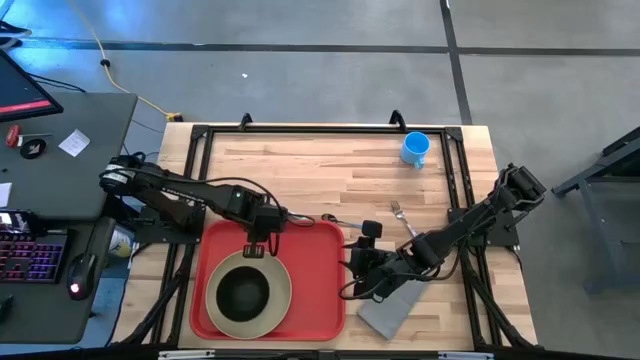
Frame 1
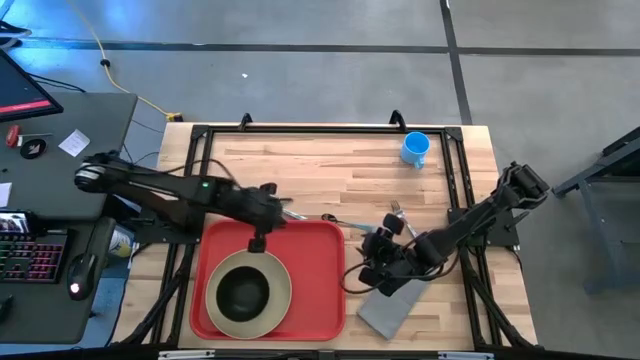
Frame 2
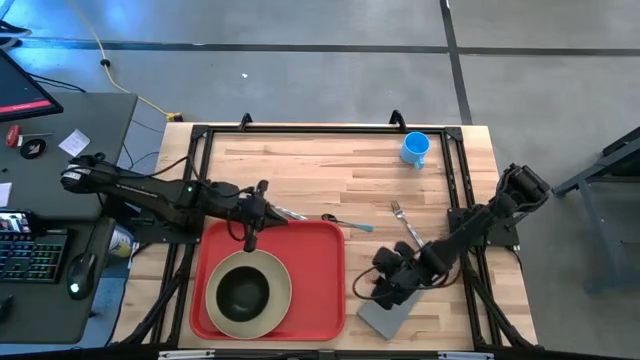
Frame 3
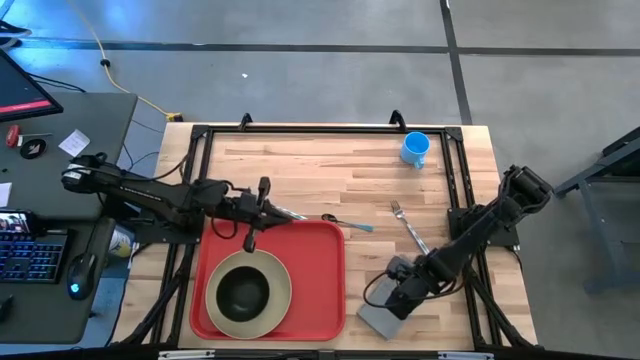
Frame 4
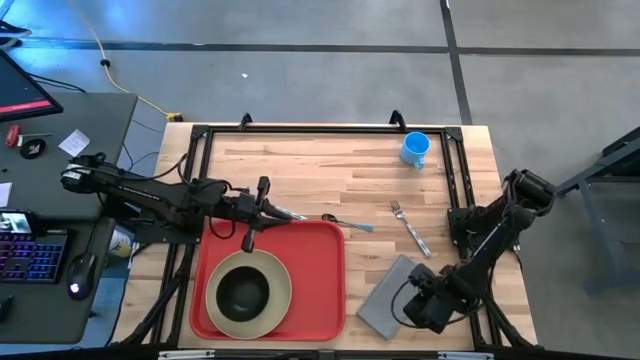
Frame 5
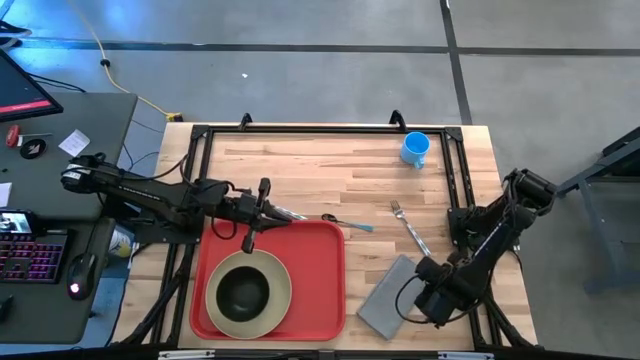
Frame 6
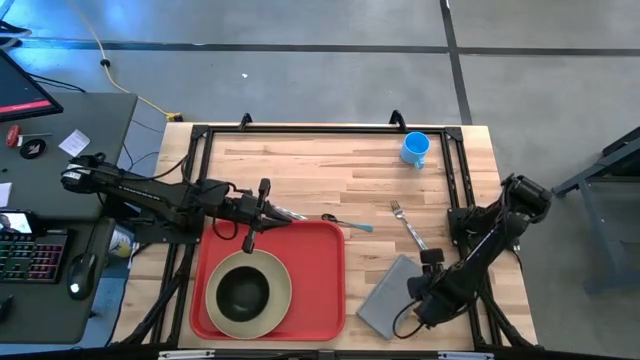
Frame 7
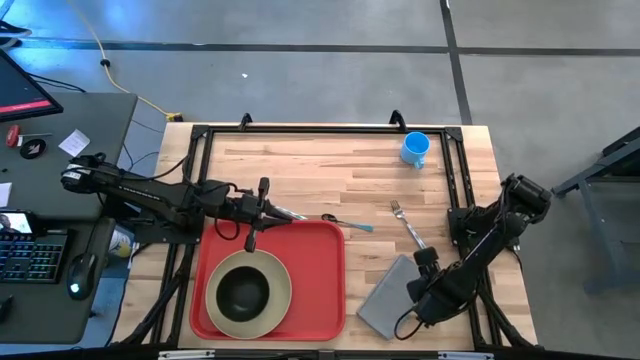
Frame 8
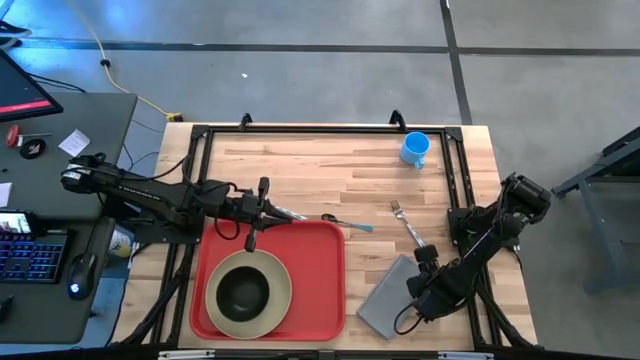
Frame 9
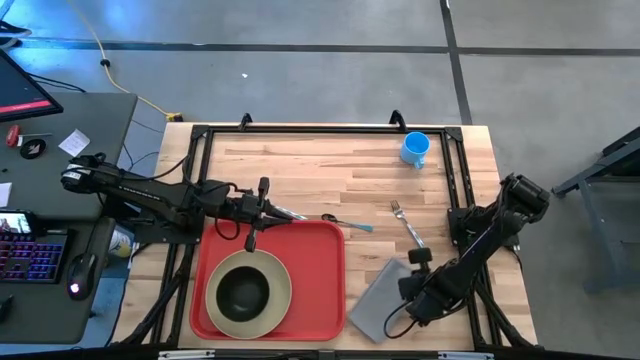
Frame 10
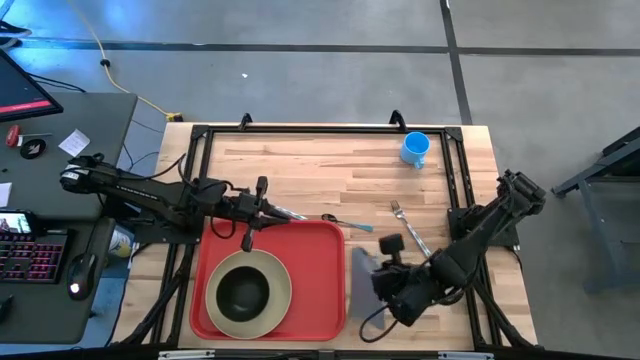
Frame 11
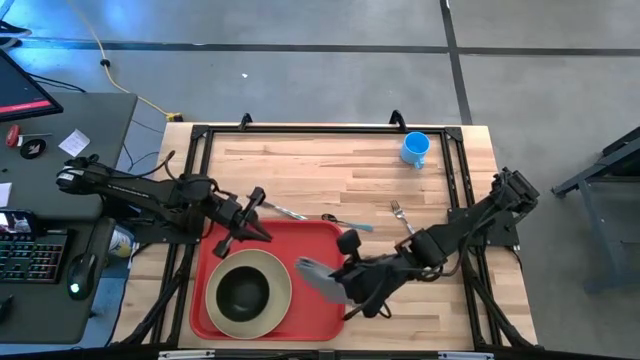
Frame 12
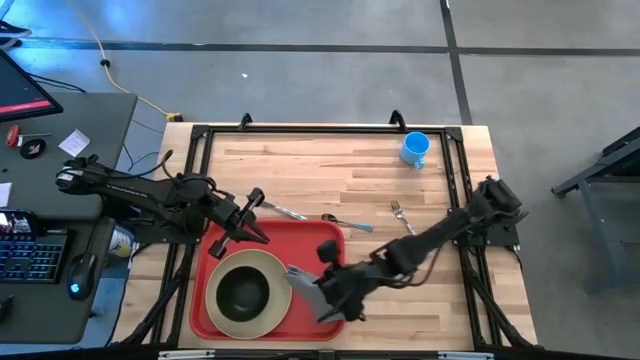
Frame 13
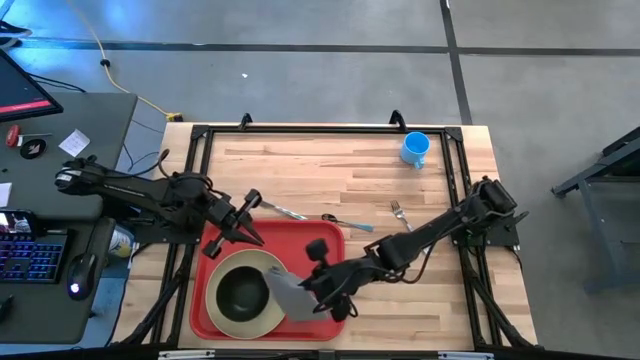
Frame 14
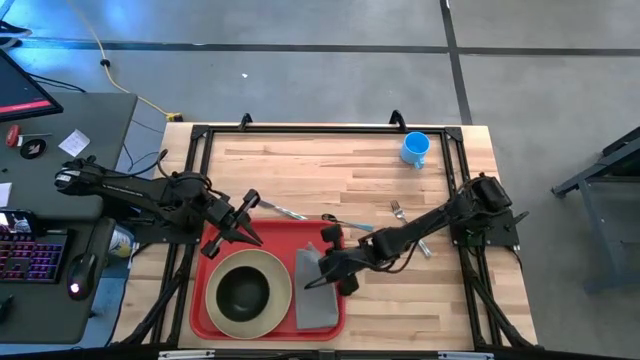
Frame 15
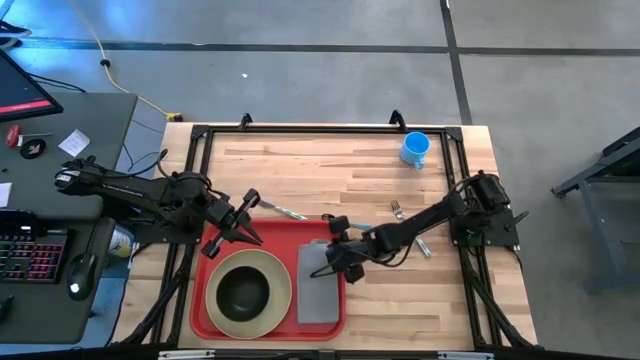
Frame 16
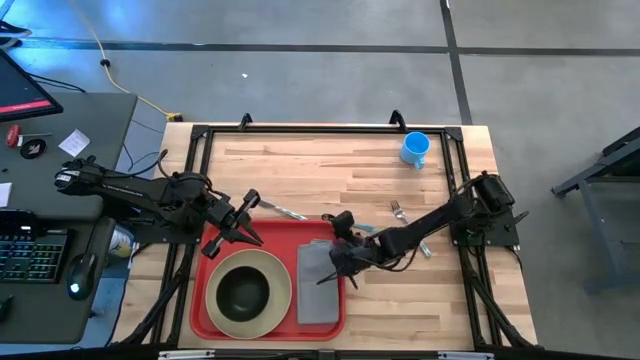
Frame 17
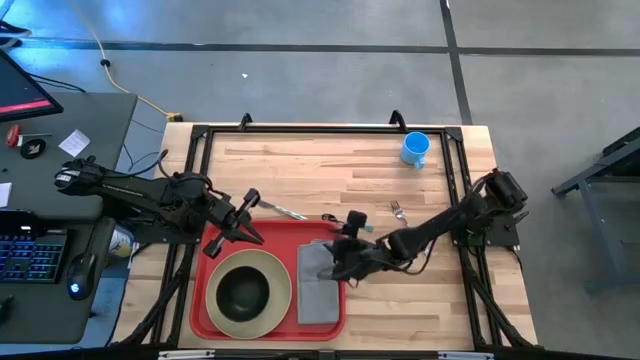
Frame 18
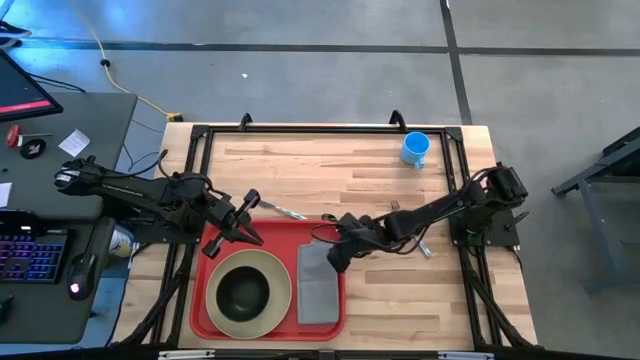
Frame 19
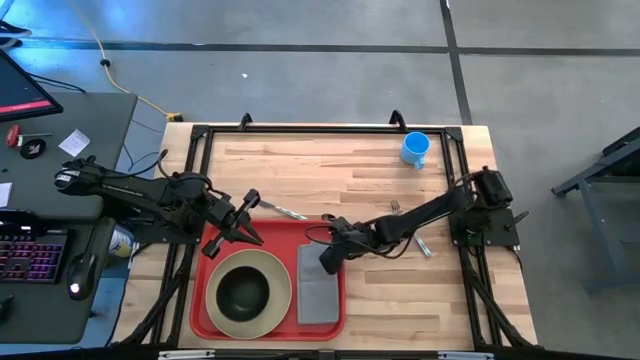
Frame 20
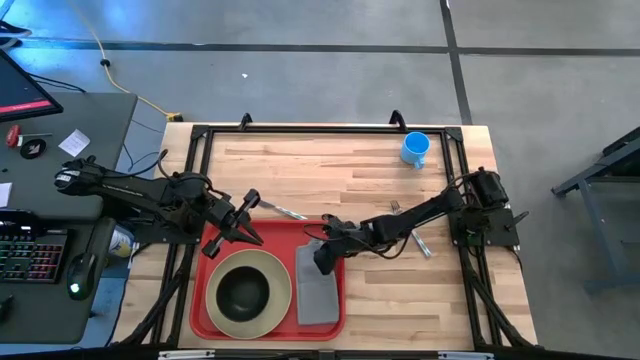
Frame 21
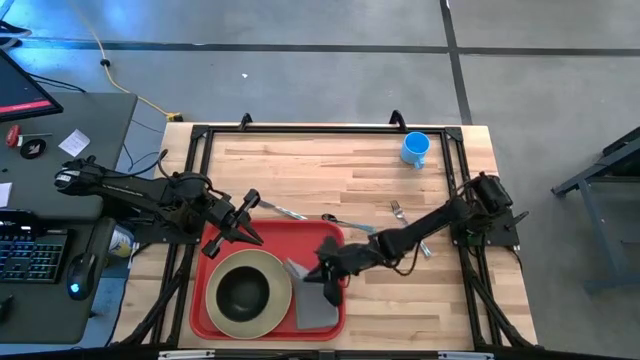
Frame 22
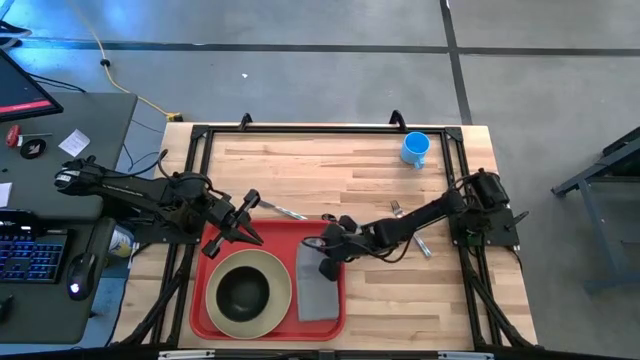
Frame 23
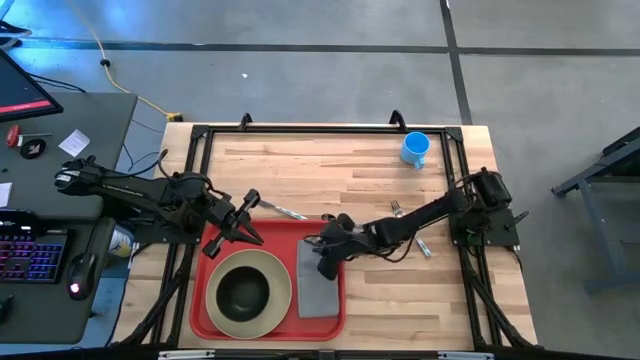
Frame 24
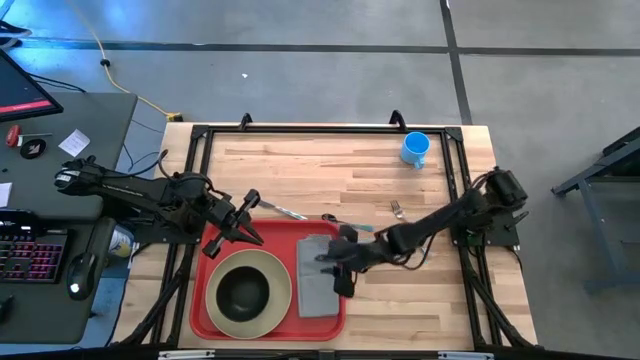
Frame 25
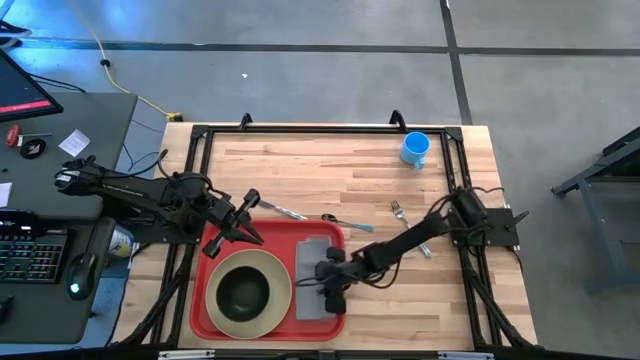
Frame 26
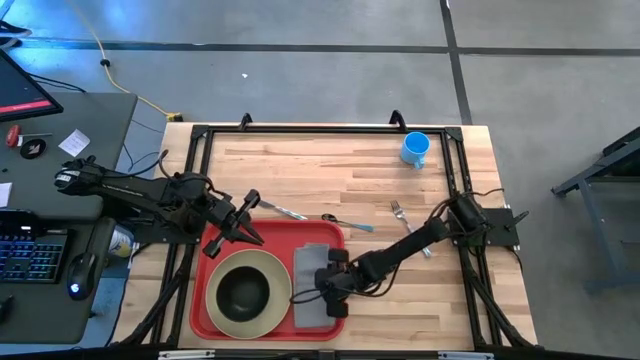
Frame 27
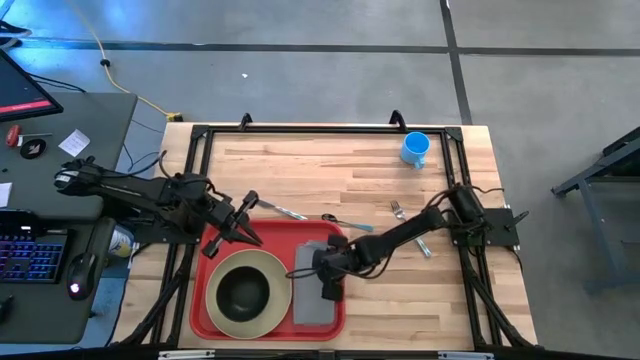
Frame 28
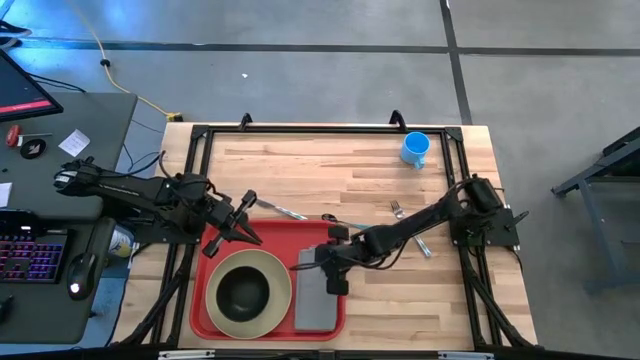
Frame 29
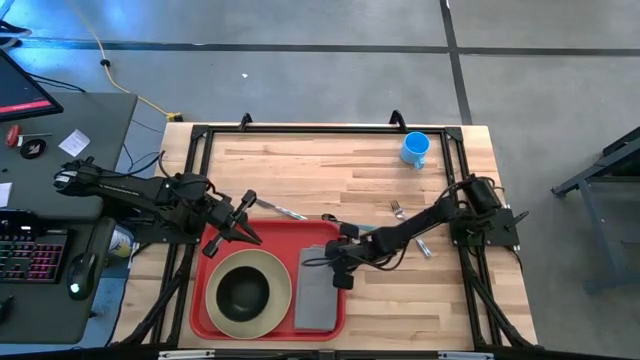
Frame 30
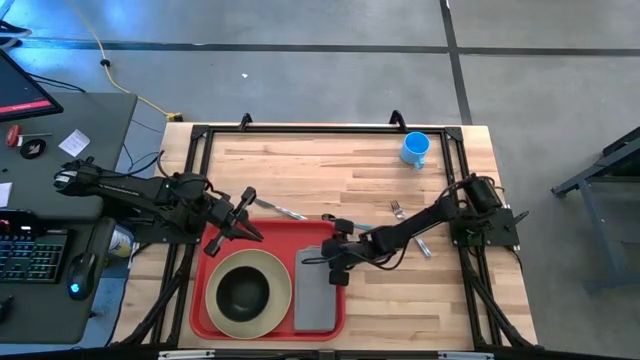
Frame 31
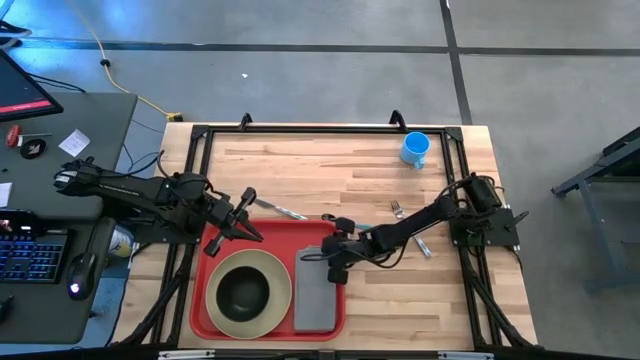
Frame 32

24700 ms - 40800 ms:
Task: Set up tray
Put the gray napkin on the red serving tray to the right of the light brown plate
